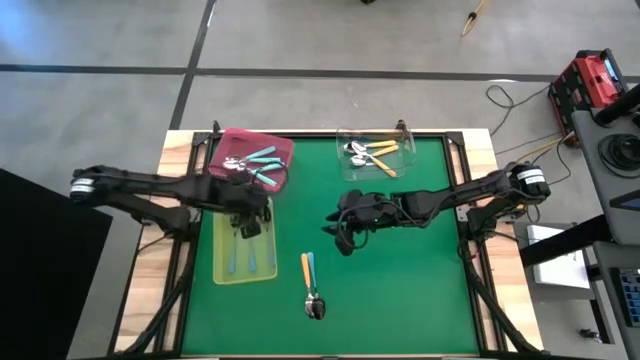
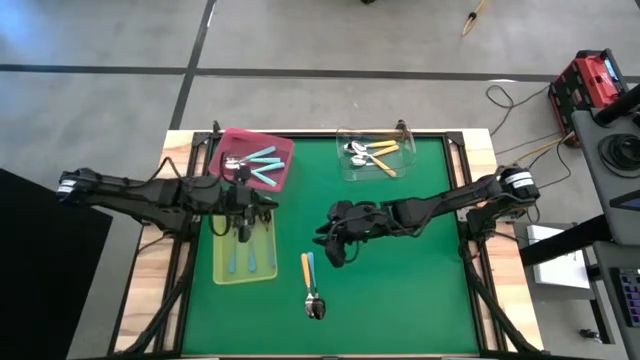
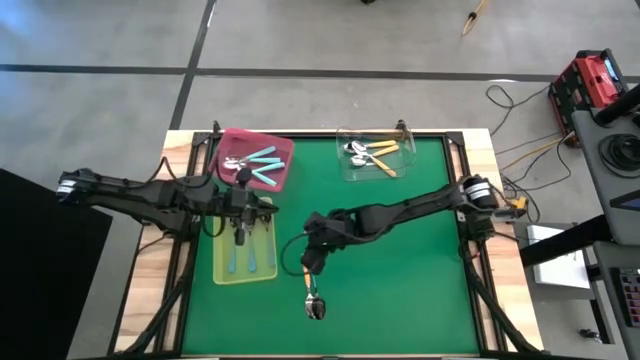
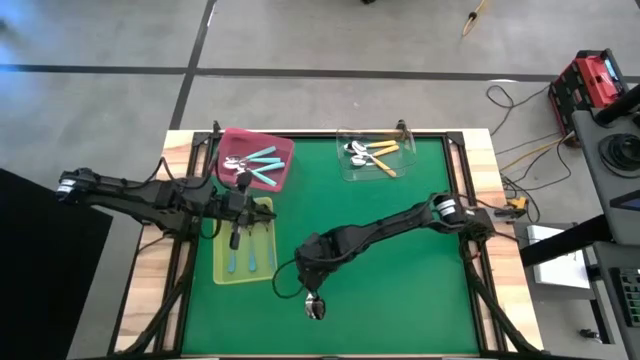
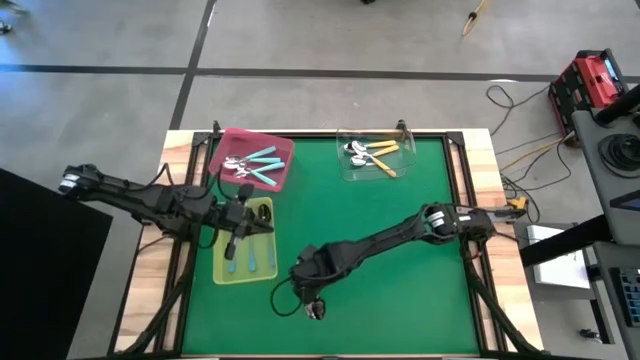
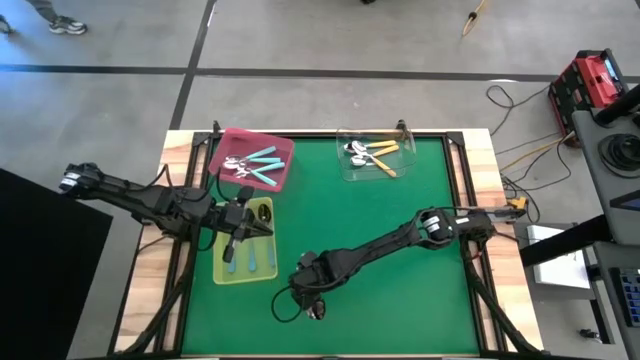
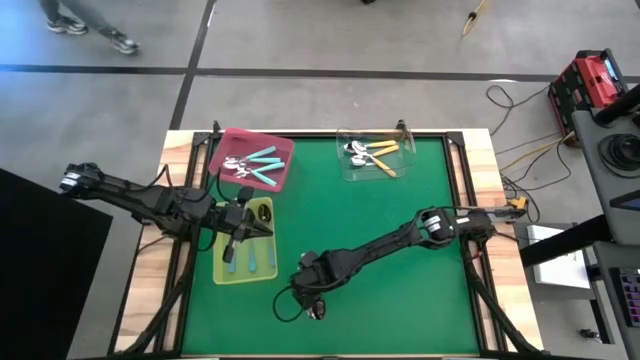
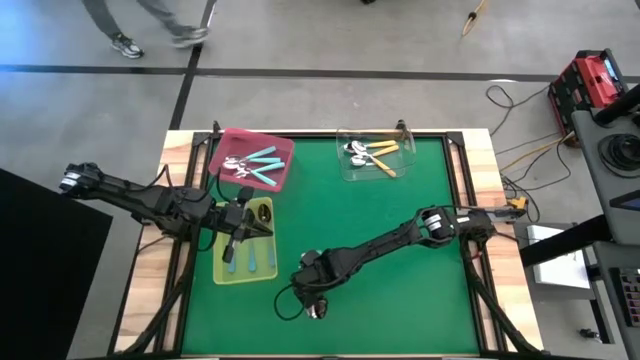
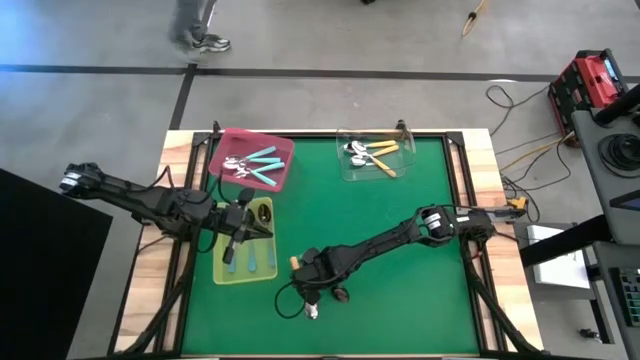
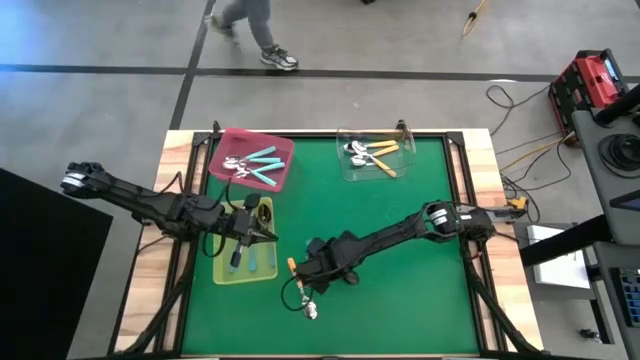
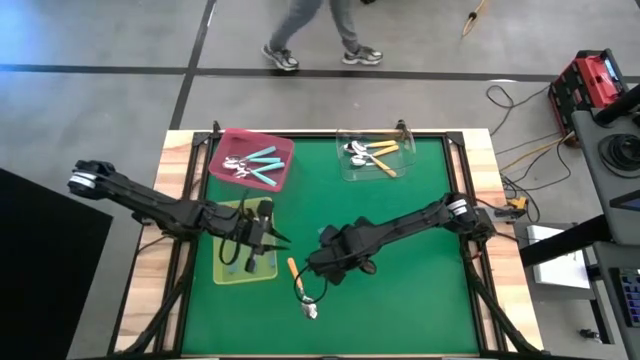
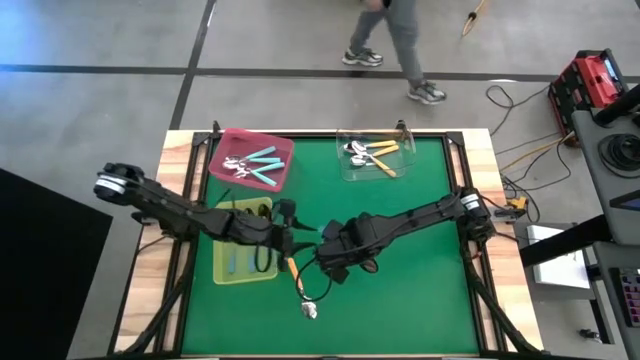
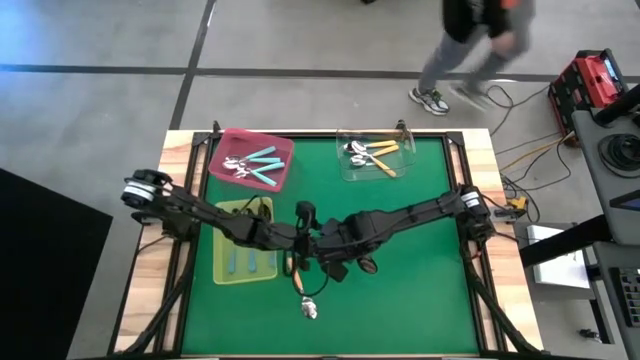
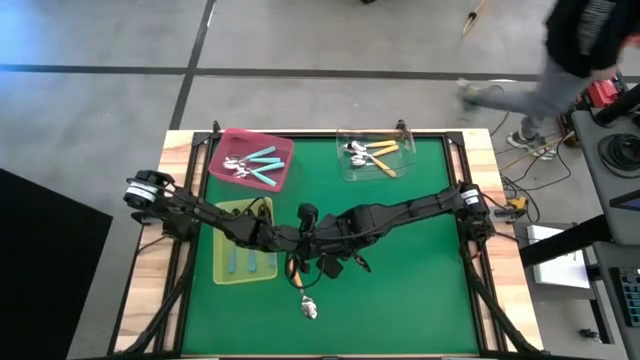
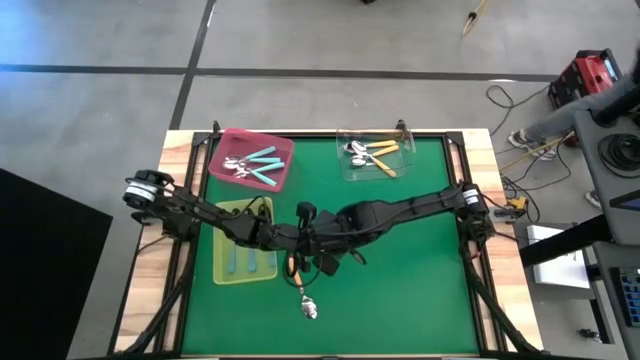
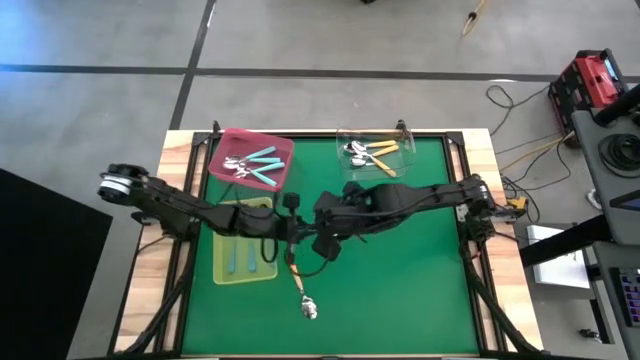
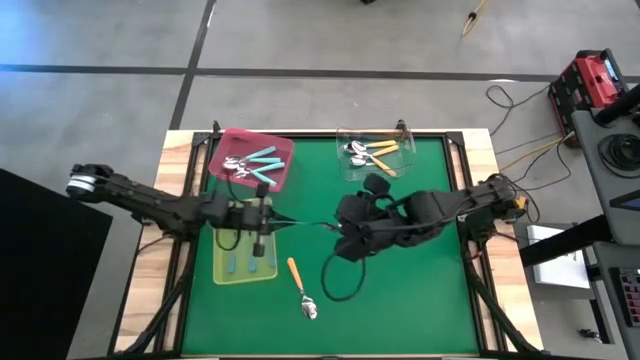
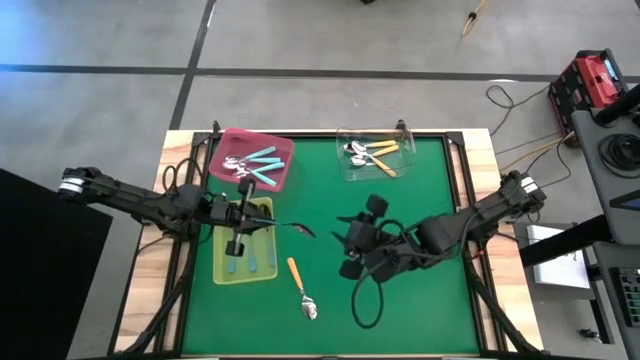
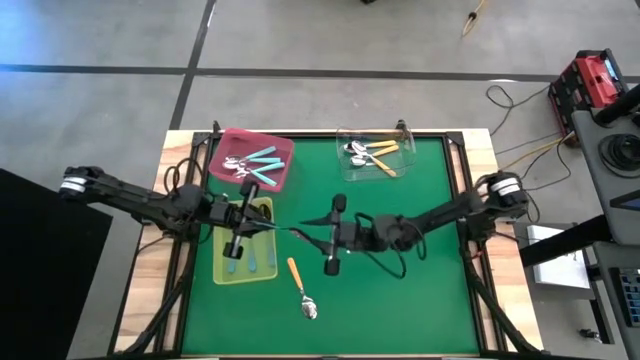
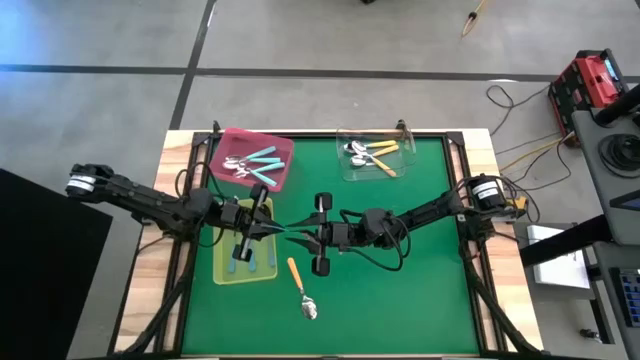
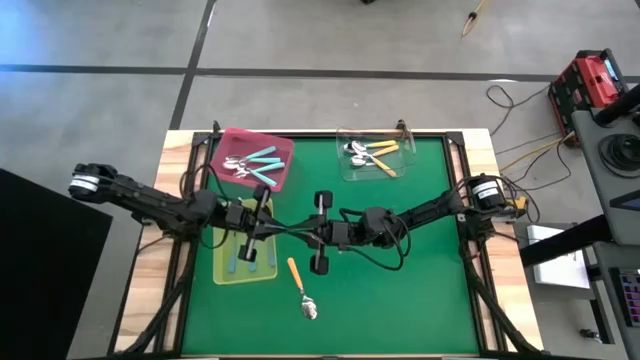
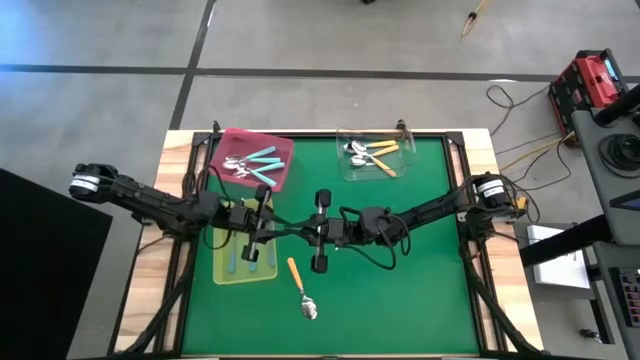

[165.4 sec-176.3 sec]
Task: Sort silverware by color (type)
Put the blue spoon into the yellow bin

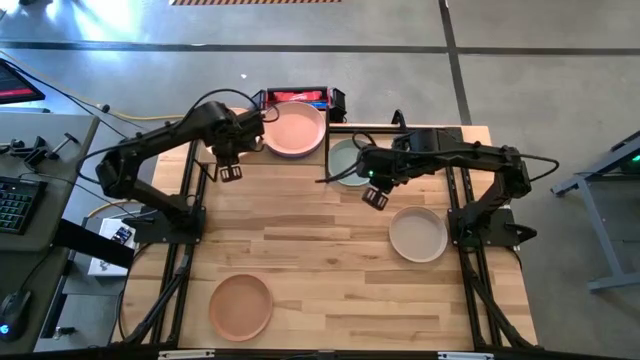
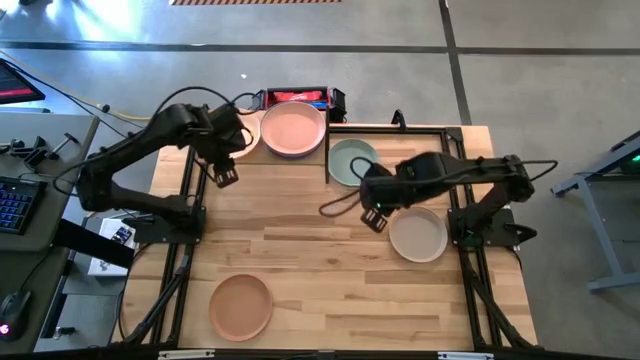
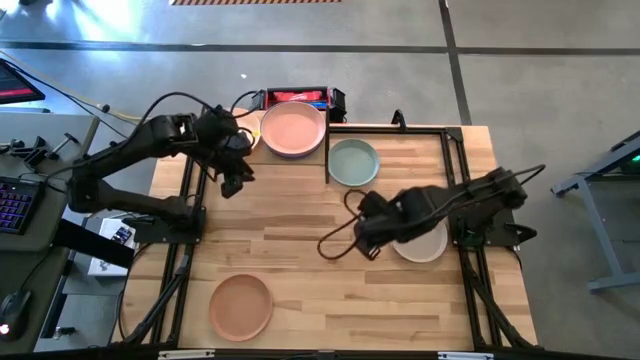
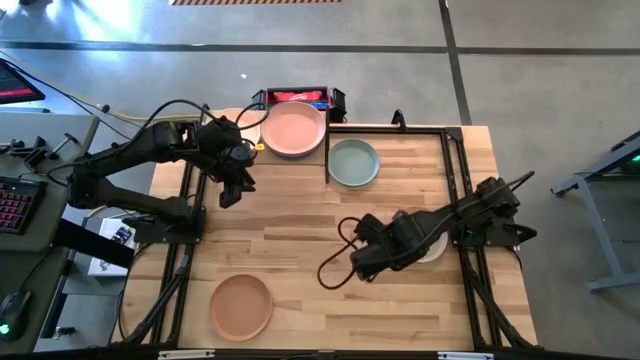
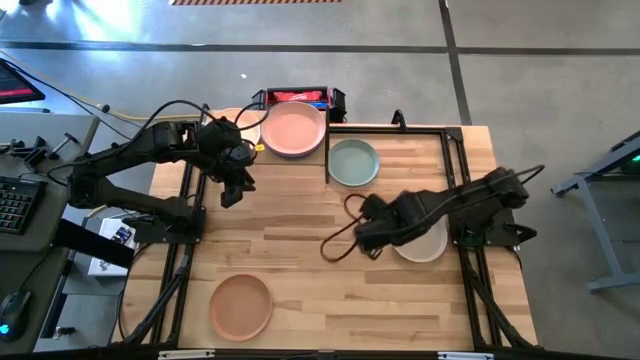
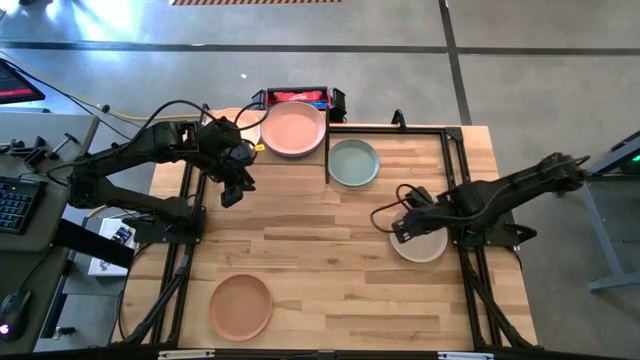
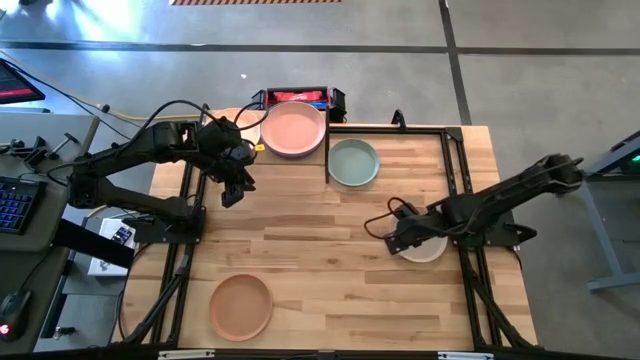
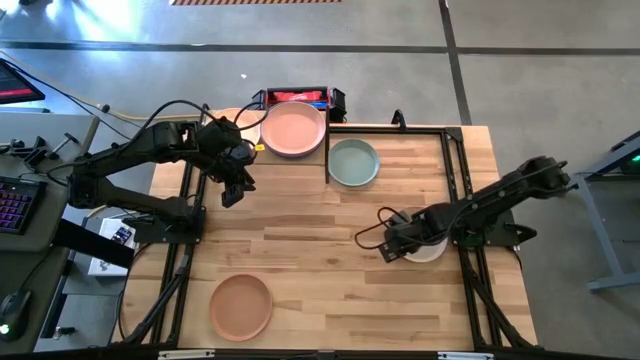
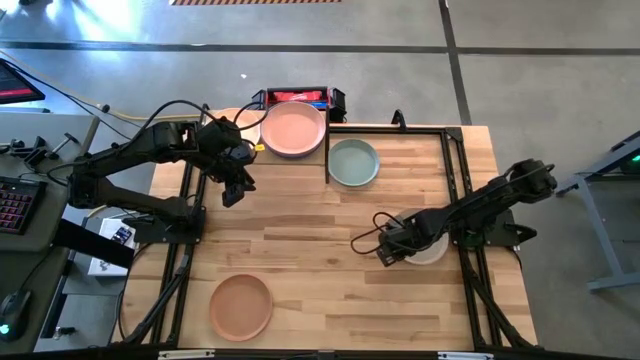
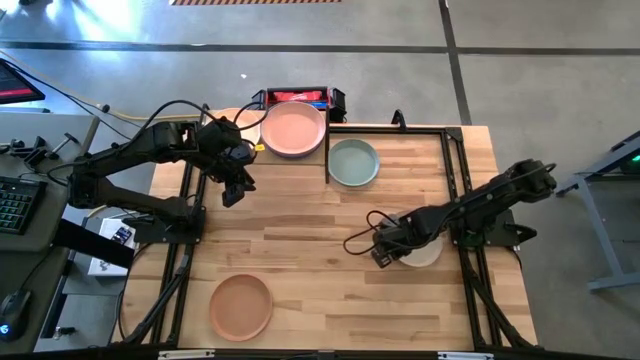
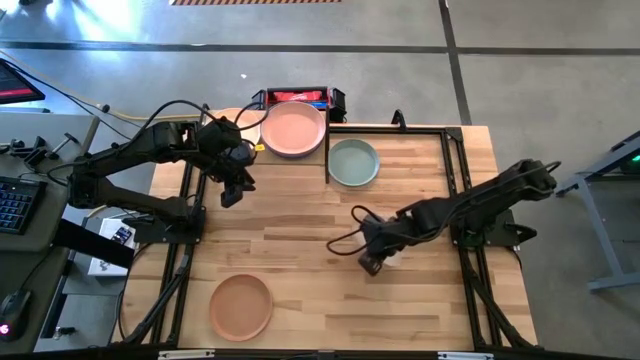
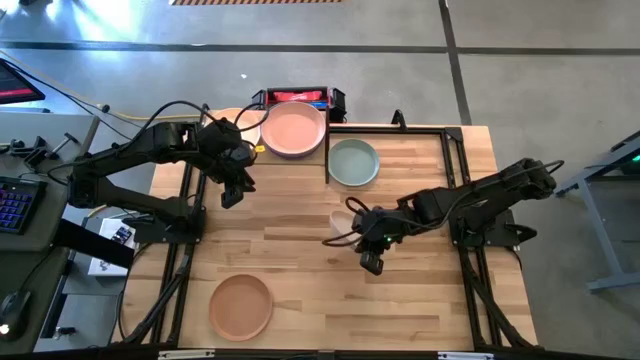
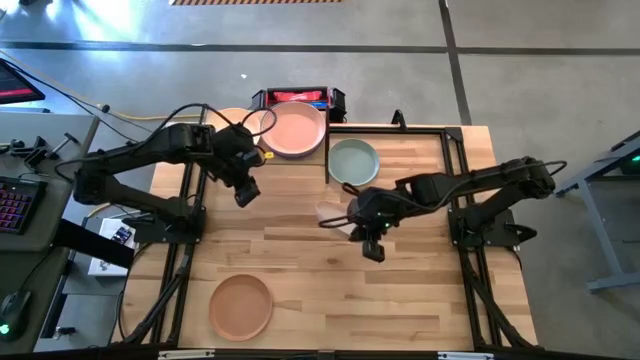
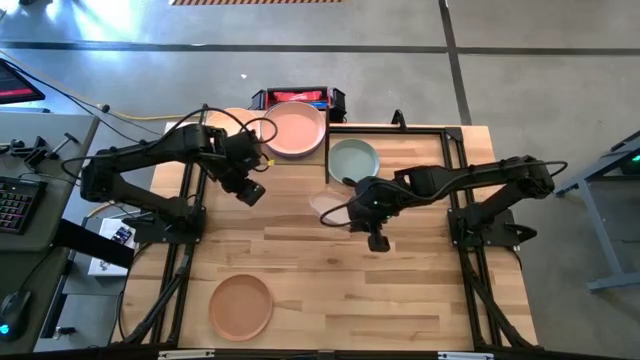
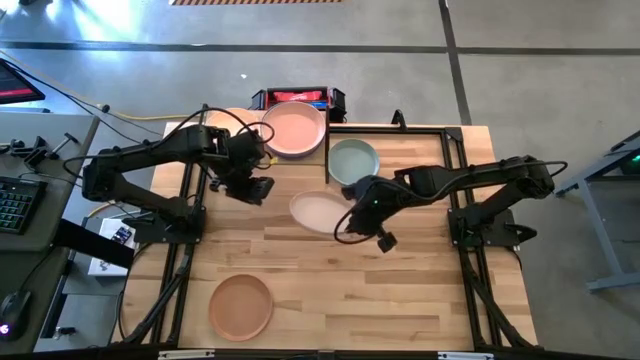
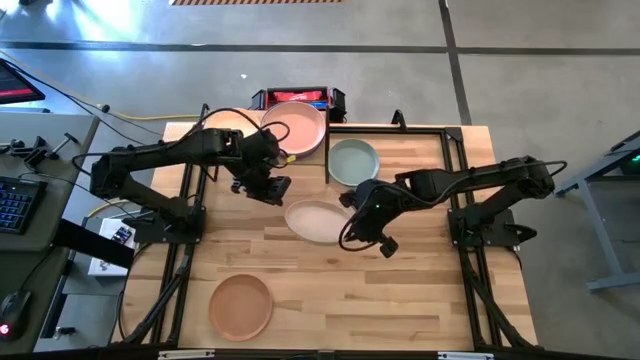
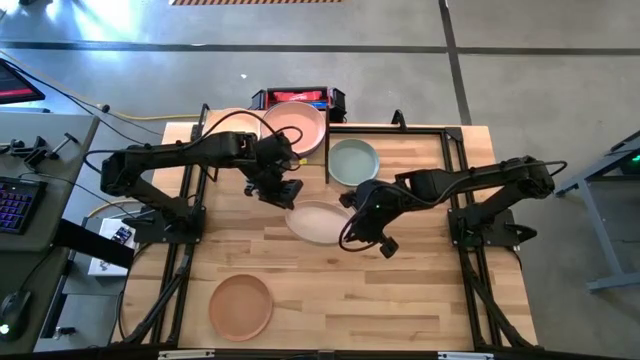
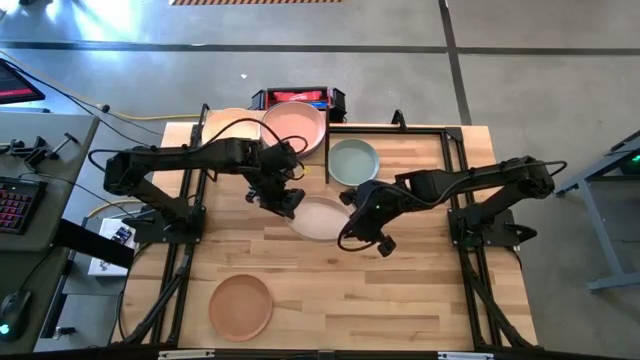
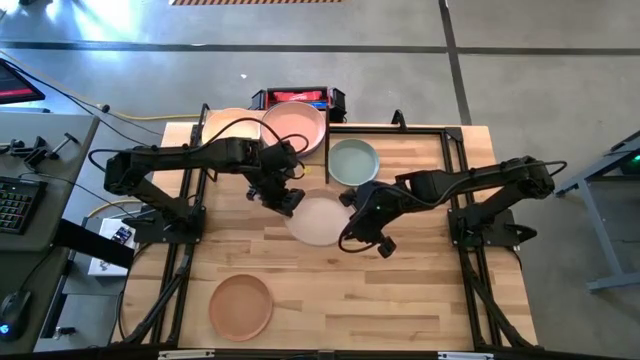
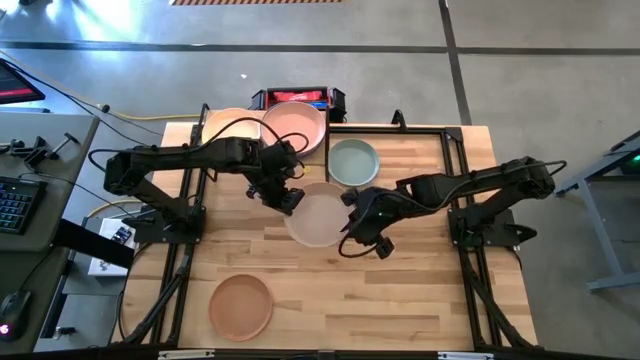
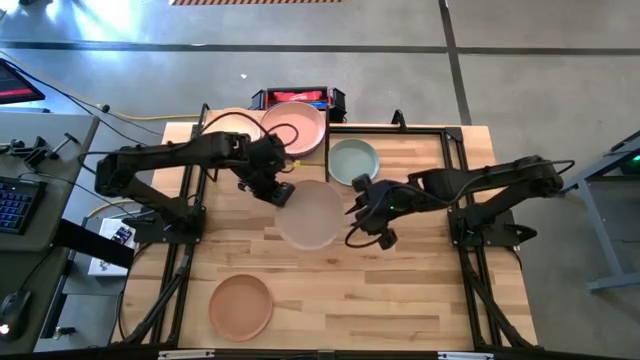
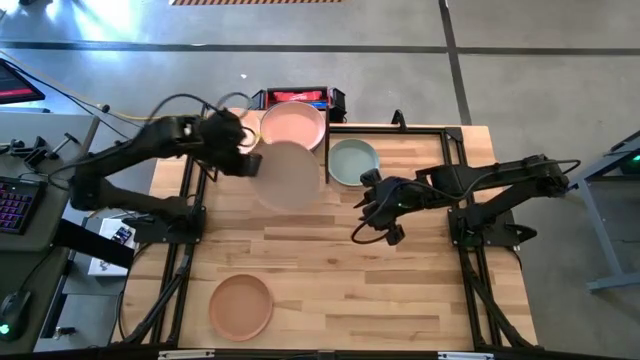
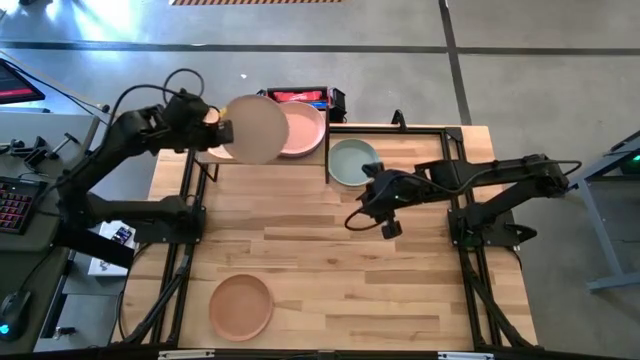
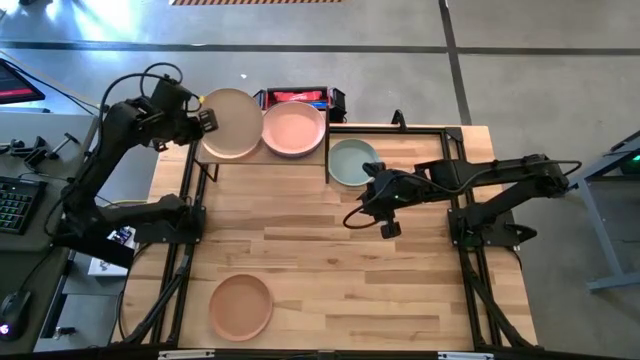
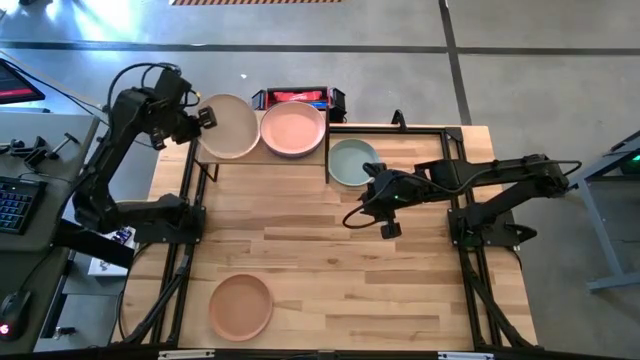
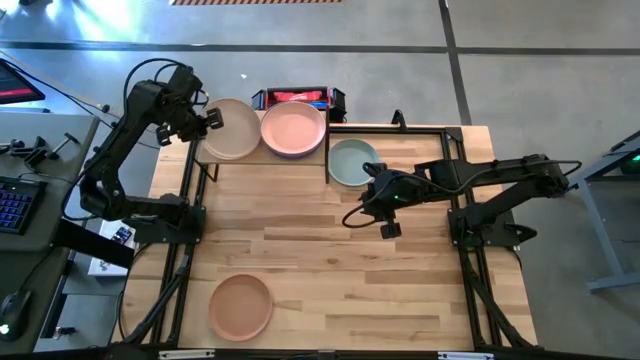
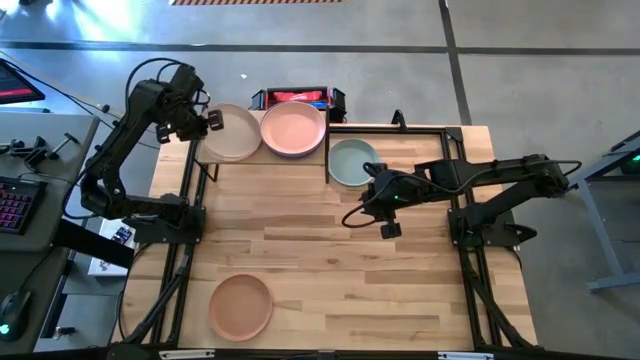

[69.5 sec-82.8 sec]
Task: Place and stack plates onto a shelf
Stack the gray plate on top of the white plate on the shelf
